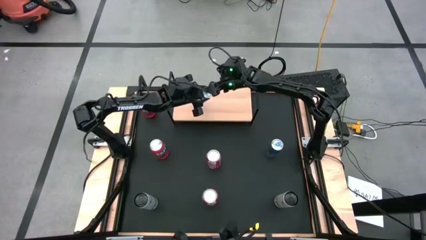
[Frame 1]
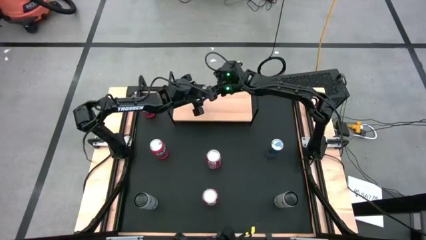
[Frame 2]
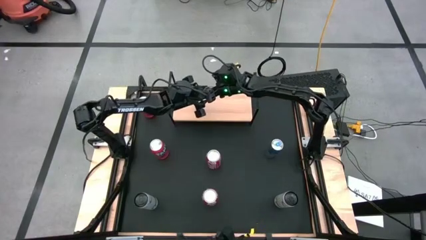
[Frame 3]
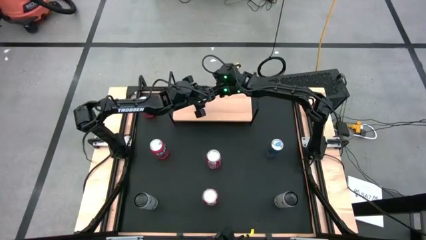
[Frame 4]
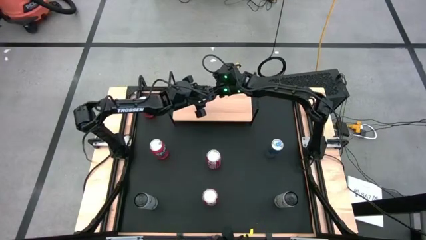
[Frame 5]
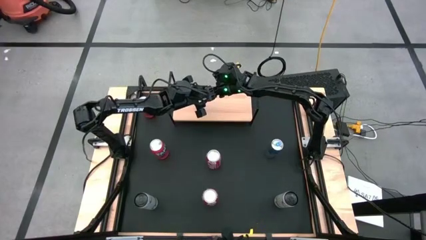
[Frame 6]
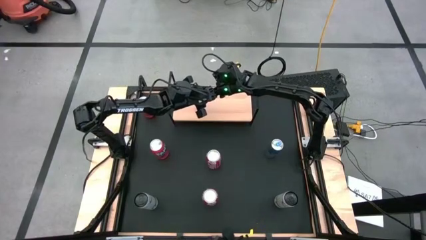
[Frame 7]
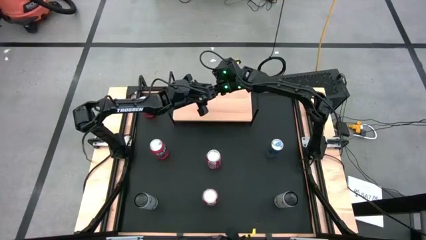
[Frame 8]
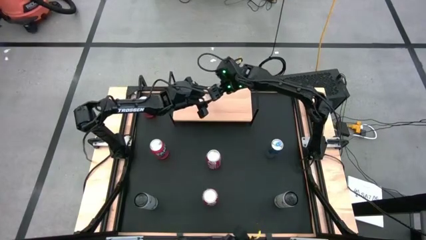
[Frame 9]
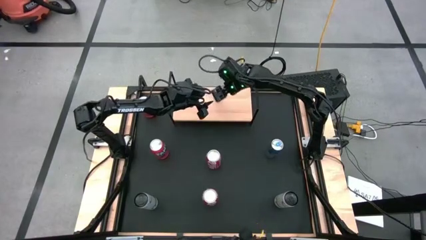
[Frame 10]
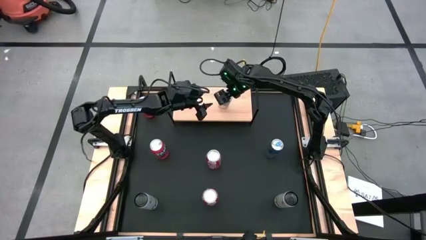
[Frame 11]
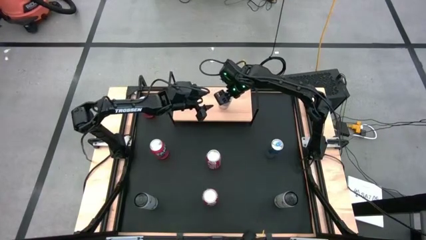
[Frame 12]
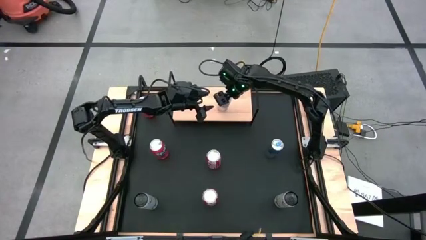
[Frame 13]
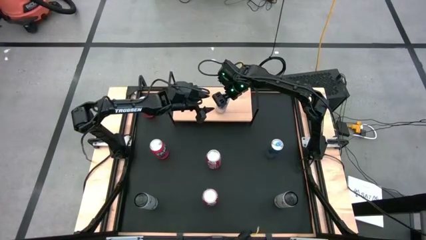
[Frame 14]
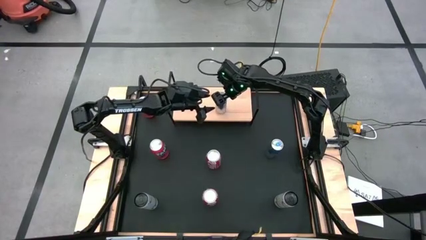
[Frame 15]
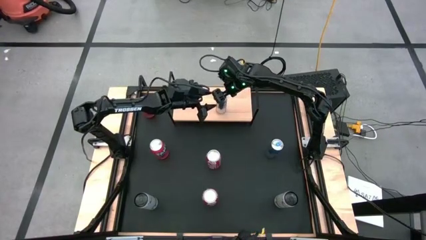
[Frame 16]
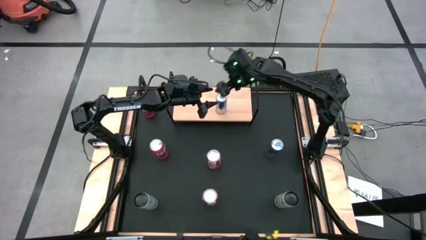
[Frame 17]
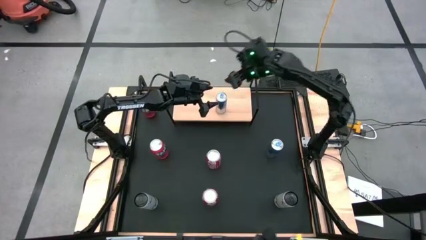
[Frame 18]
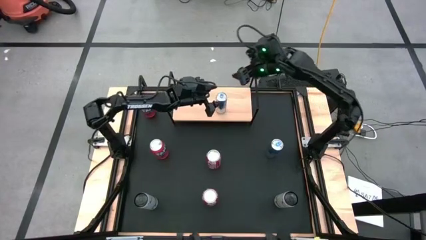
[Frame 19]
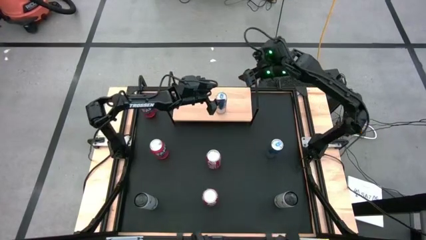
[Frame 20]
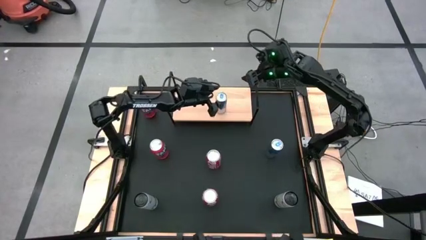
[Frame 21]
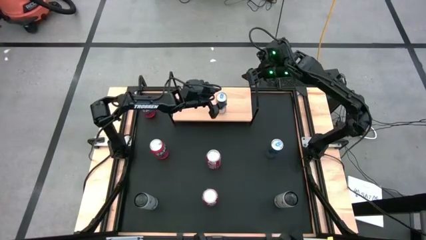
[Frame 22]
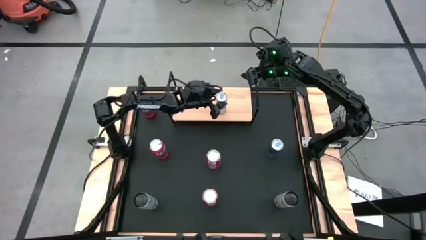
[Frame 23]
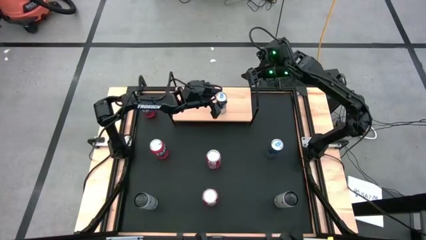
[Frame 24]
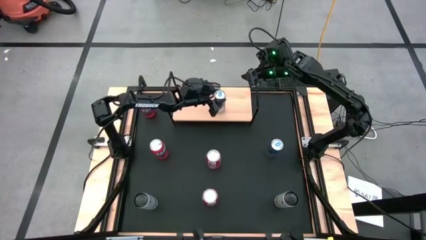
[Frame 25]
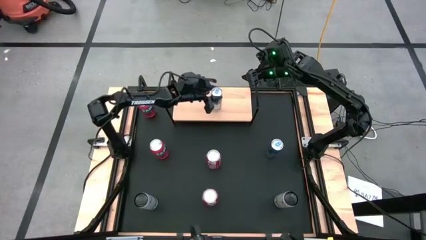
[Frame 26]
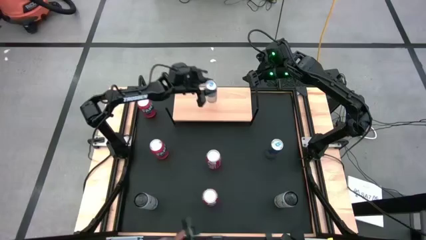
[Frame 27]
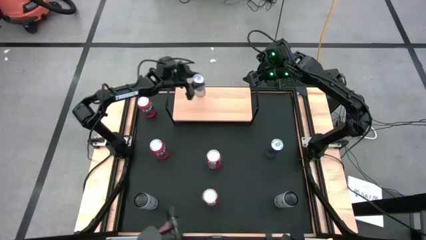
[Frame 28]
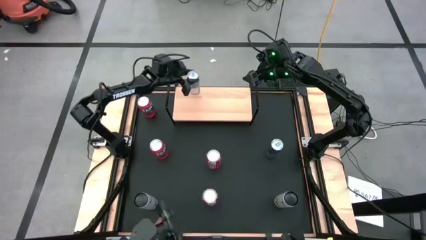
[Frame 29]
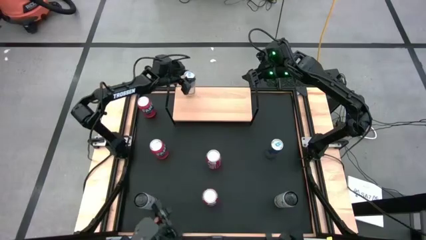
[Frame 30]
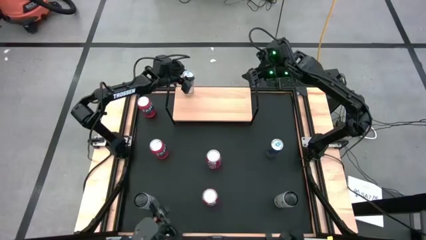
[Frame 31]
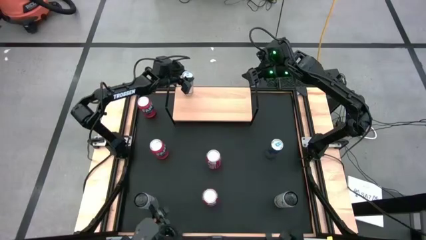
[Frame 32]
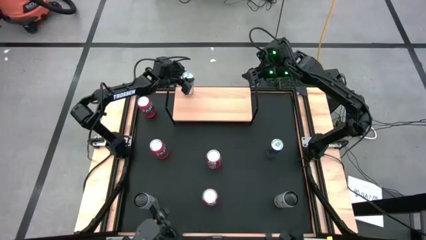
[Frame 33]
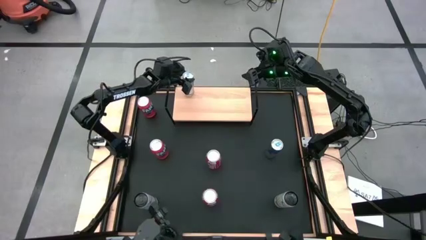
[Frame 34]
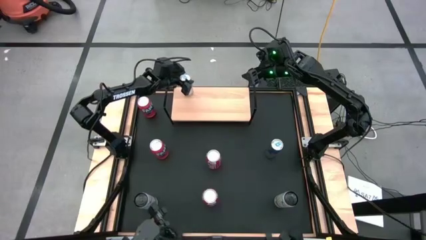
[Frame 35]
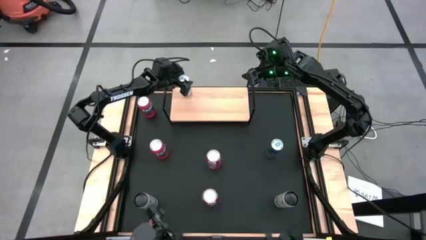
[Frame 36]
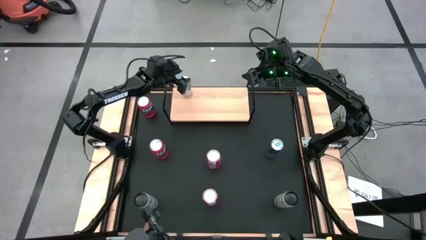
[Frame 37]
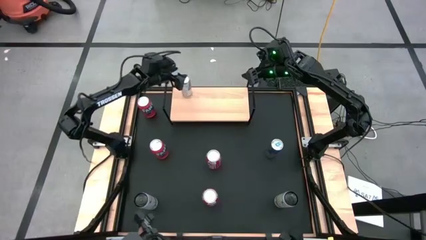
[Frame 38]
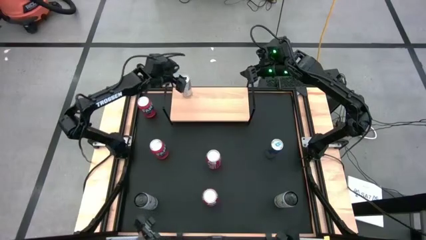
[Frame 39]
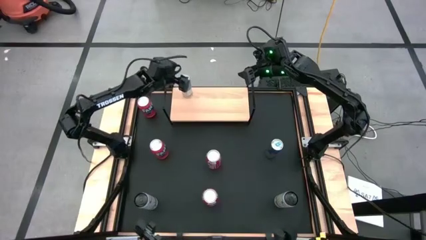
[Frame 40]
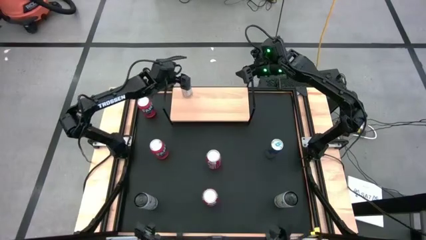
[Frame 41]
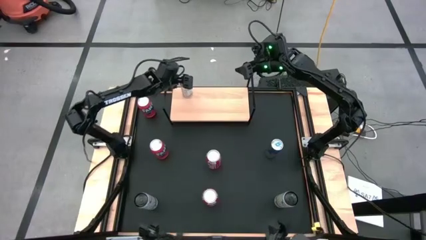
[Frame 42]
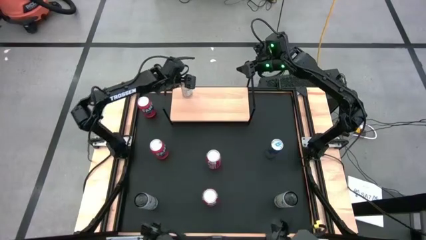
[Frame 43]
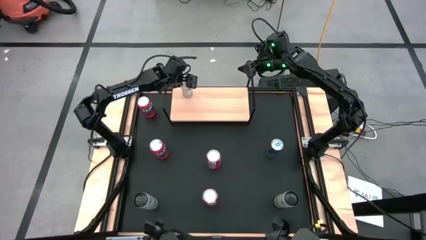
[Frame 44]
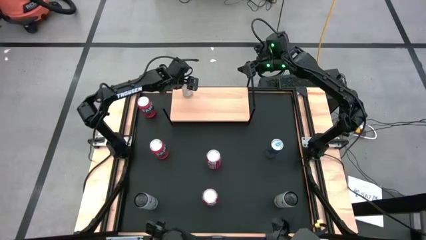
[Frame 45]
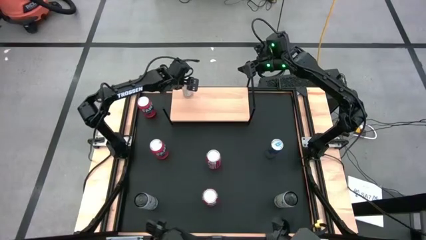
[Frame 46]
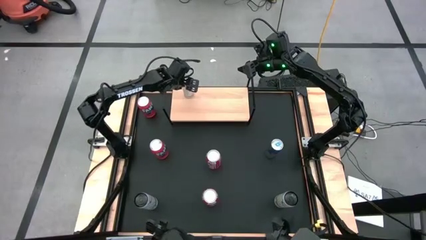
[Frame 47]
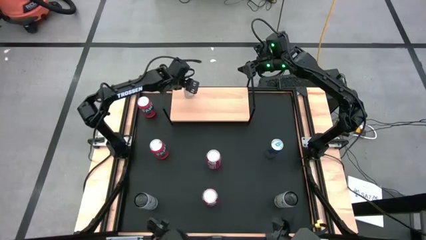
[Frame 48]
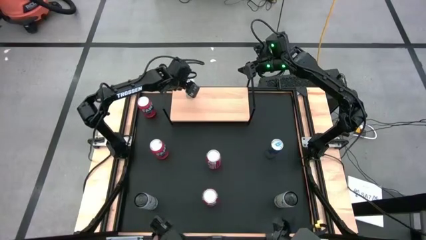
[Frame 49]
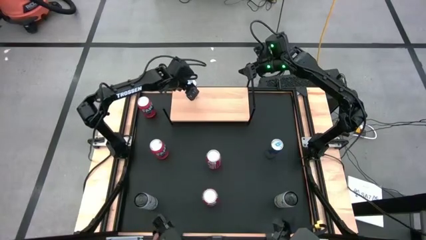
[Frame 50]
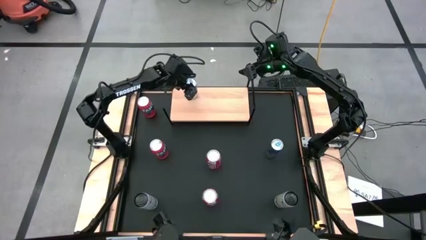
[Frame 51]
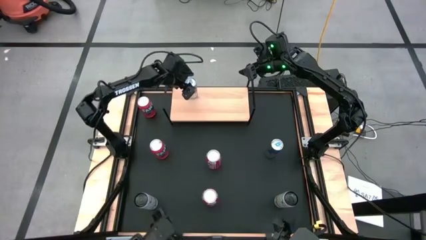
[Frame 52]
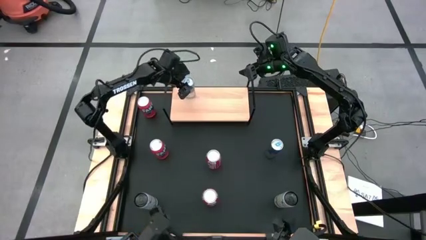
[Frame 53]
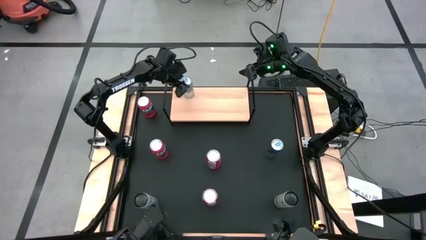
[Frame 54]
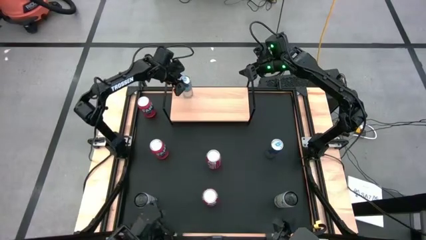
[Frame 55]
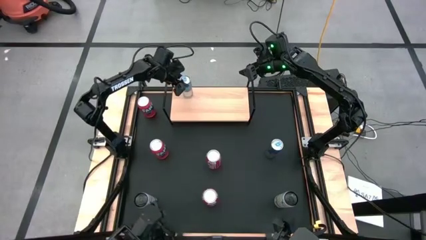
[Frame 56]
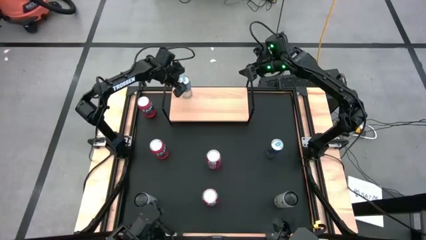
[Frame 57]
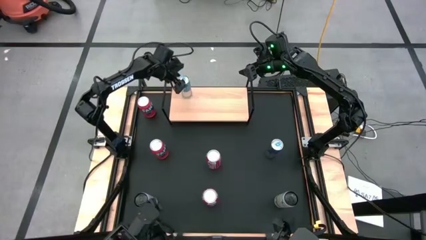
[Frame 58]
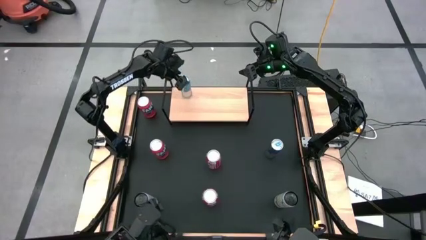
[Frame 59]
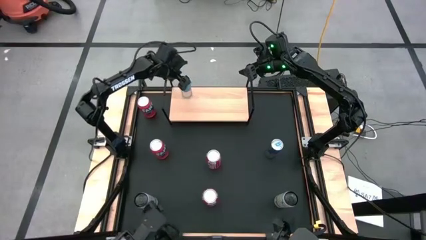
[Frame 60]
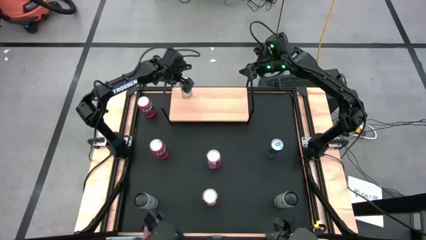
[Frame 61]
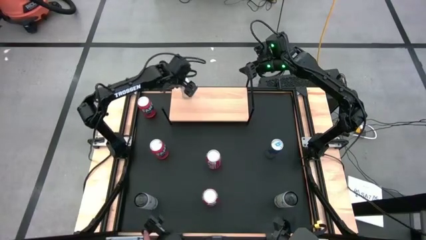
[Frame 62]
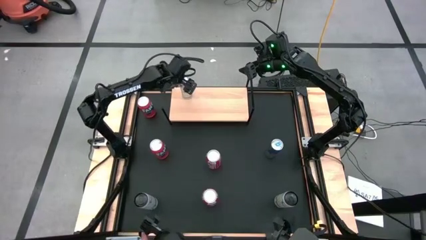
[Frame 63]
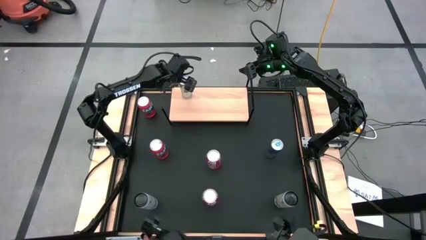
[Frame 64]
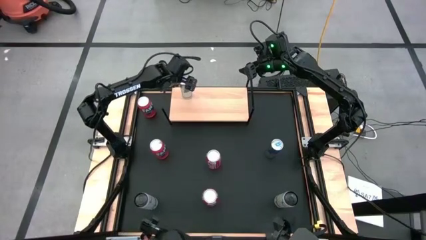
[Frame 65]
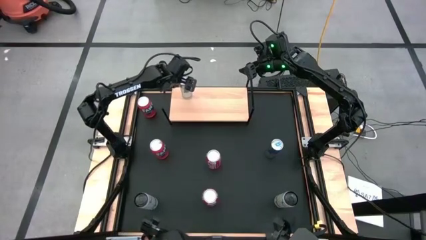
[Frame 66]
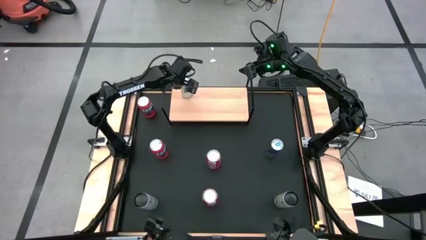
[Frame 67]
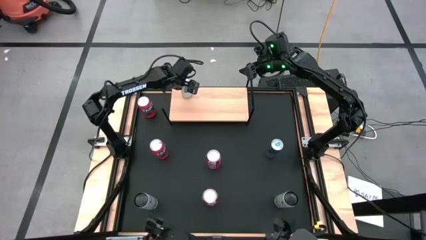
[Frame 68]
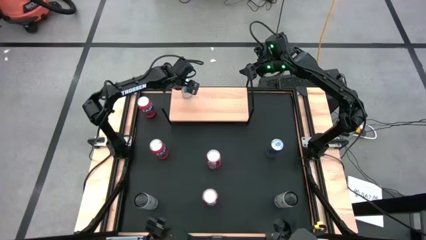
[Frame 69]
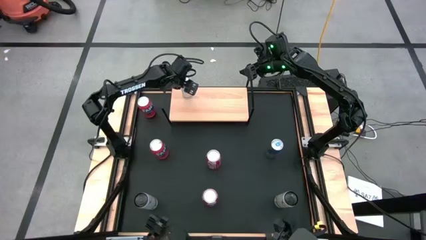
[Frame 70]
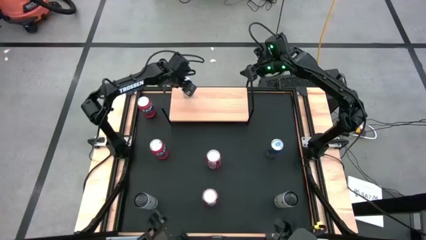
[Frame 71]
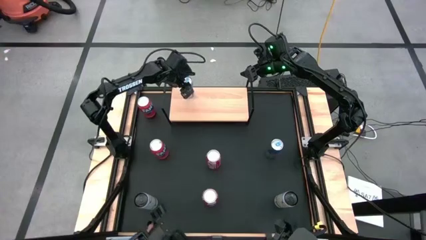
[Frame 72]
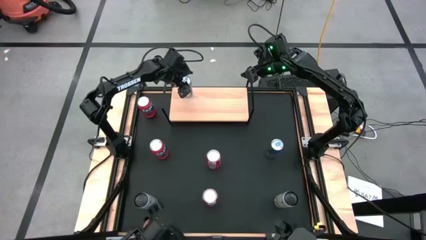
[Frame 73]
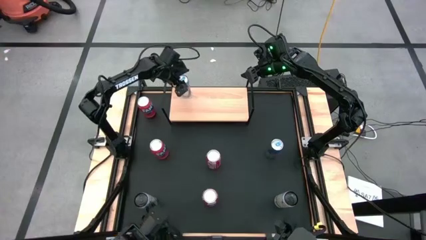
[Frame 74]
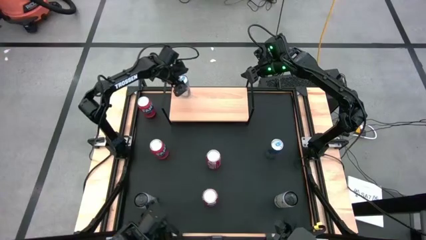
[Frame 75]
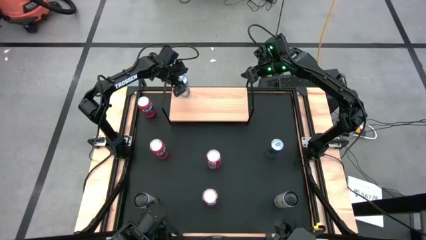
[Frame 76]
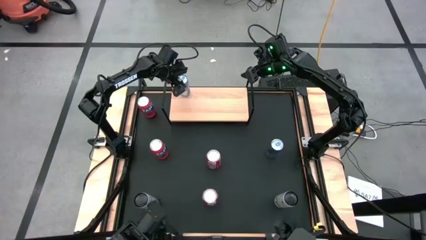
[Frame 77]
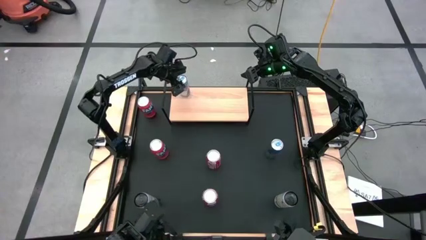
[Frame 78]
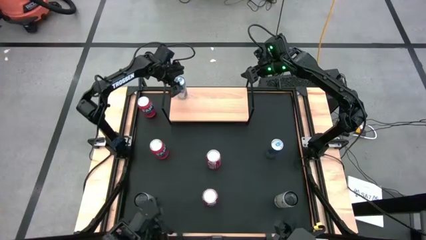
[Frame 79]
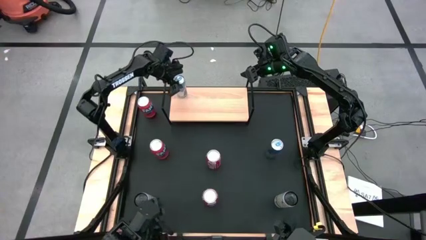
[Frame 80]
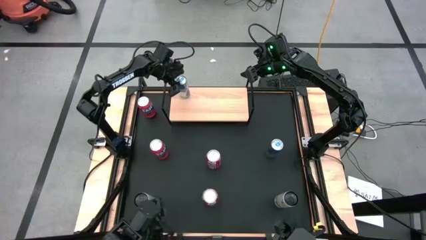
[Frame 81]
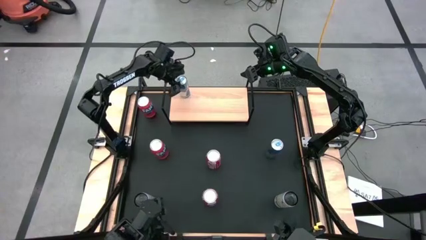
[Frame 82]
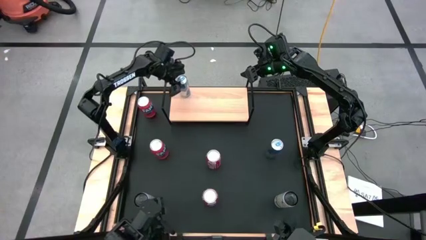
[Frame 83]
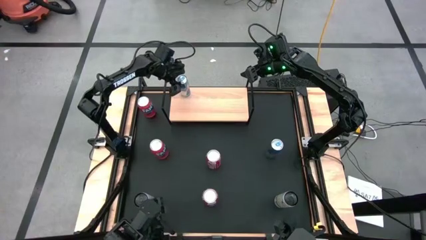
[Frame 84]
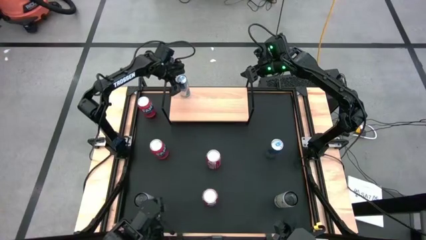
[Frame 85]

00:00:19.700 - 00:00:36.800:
Task: Place canned beverage on shelf
Put the top blue soda can on the shelf
